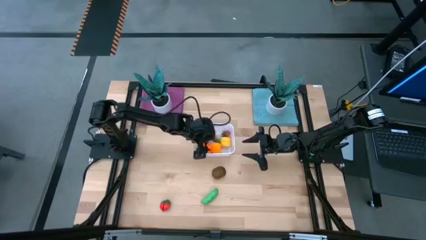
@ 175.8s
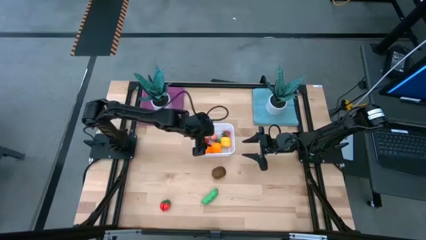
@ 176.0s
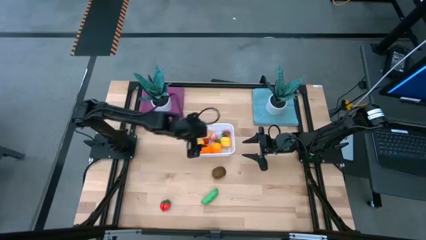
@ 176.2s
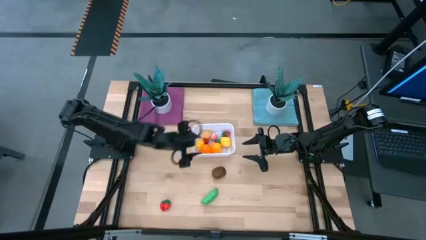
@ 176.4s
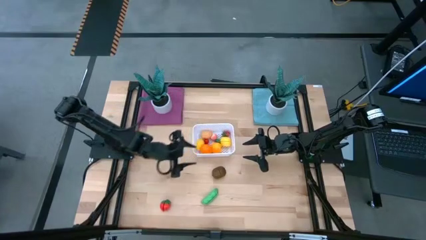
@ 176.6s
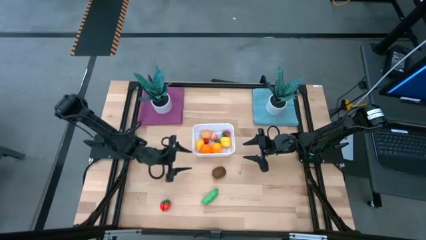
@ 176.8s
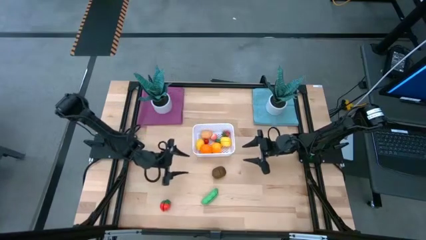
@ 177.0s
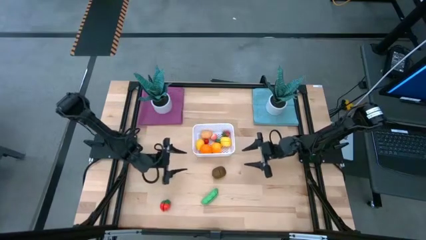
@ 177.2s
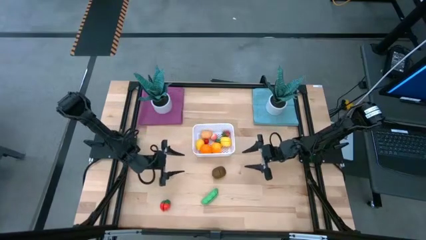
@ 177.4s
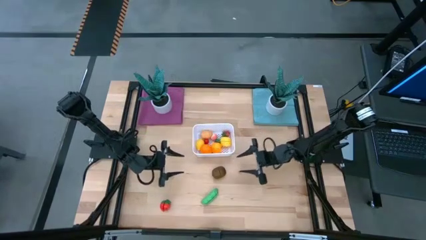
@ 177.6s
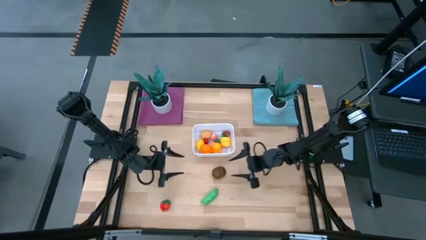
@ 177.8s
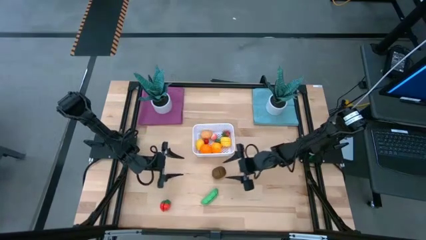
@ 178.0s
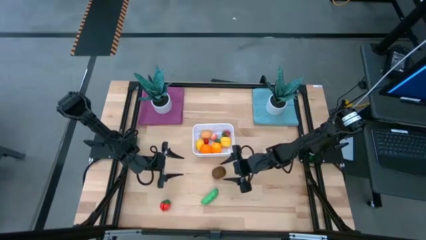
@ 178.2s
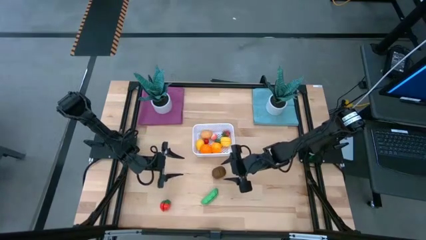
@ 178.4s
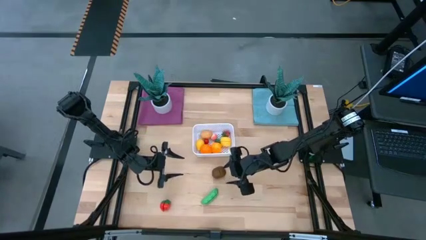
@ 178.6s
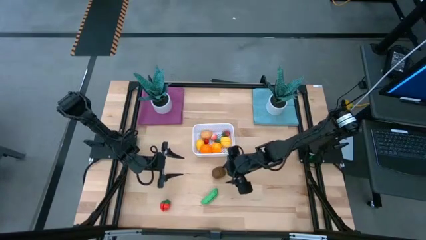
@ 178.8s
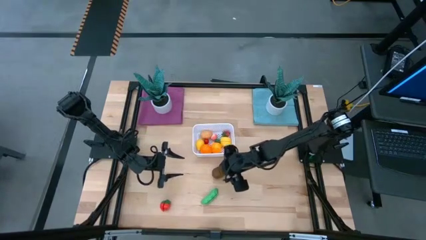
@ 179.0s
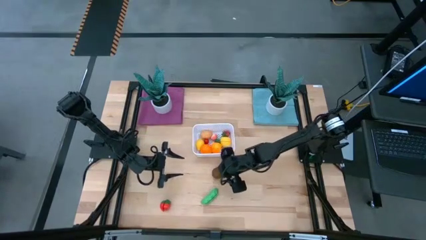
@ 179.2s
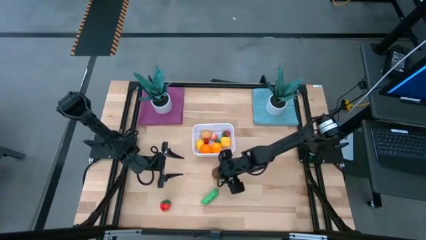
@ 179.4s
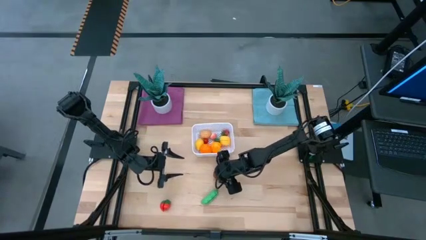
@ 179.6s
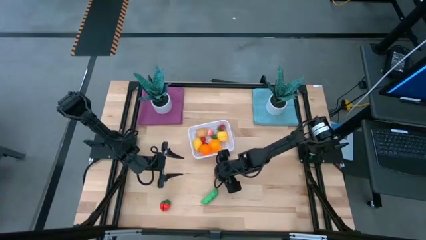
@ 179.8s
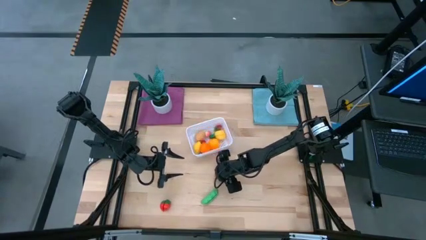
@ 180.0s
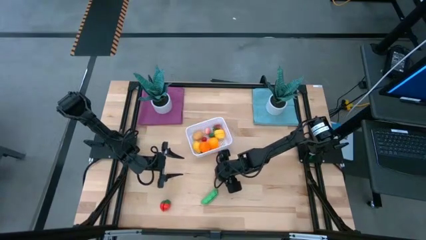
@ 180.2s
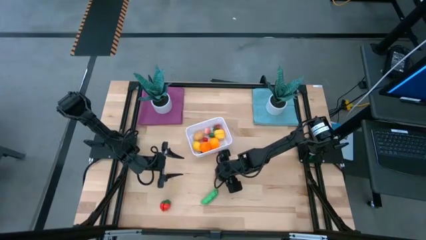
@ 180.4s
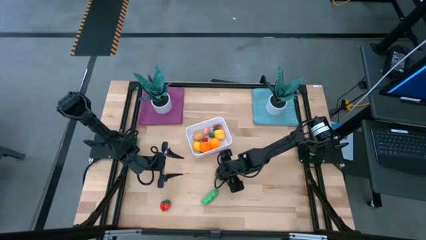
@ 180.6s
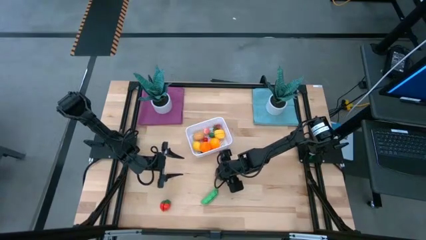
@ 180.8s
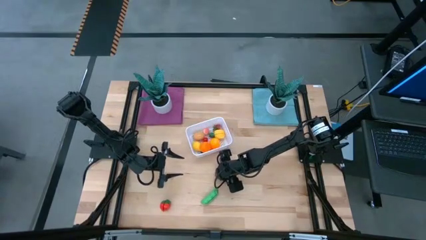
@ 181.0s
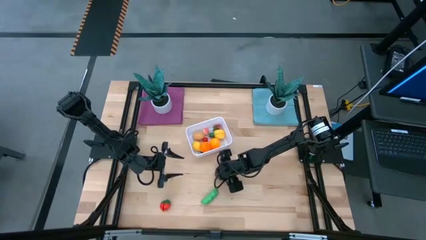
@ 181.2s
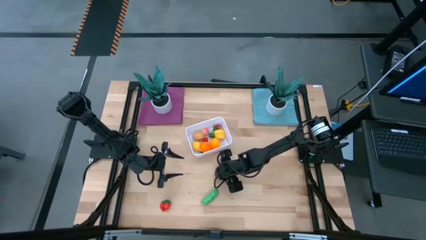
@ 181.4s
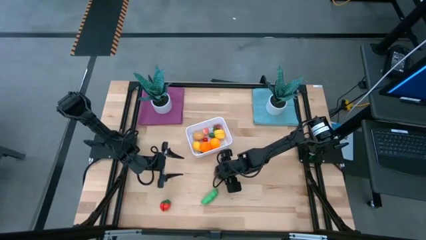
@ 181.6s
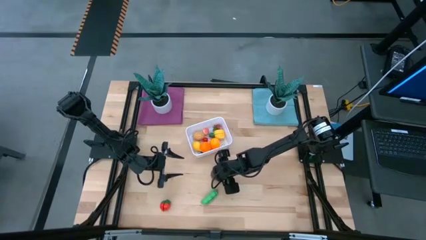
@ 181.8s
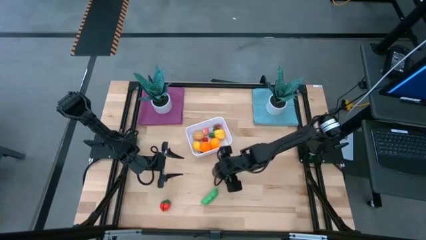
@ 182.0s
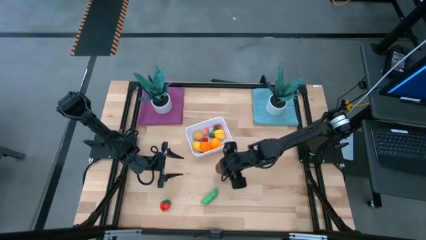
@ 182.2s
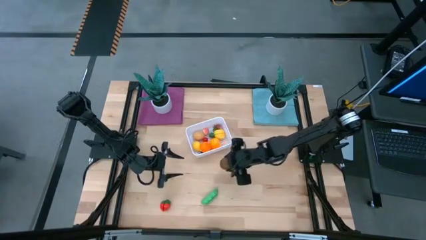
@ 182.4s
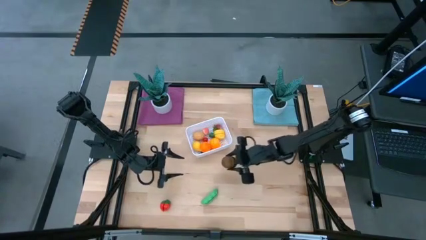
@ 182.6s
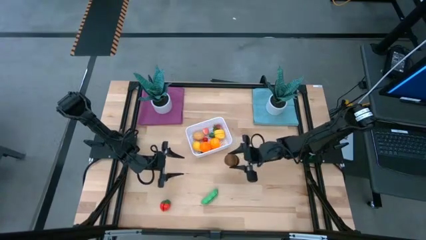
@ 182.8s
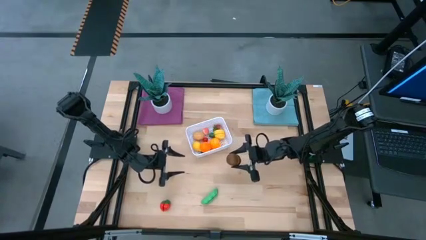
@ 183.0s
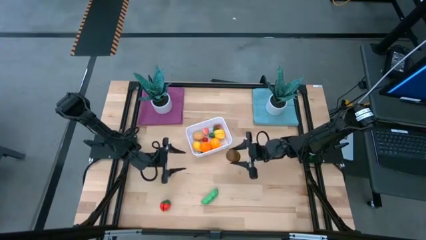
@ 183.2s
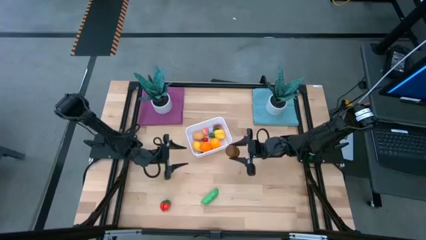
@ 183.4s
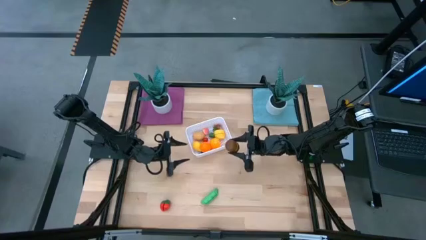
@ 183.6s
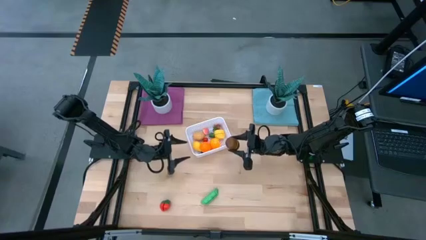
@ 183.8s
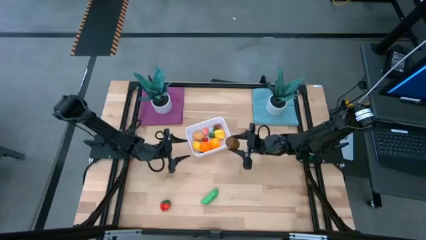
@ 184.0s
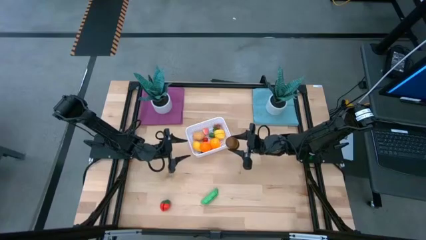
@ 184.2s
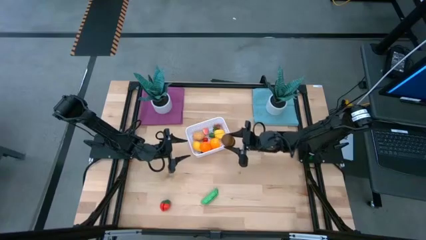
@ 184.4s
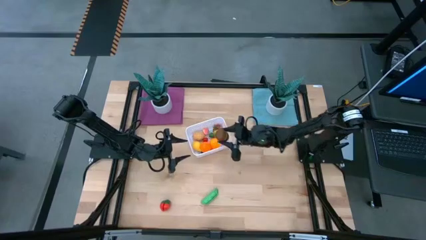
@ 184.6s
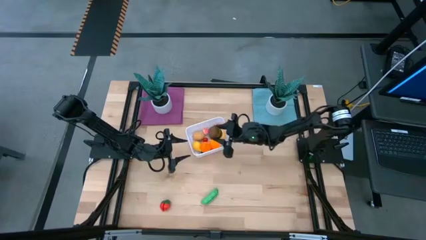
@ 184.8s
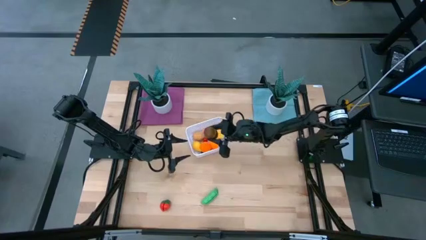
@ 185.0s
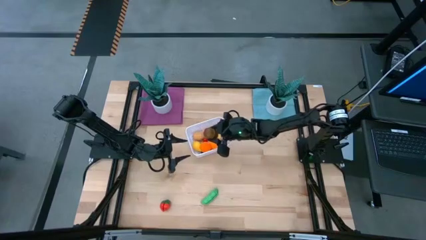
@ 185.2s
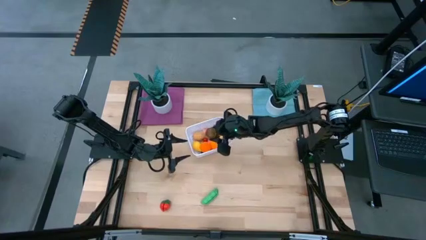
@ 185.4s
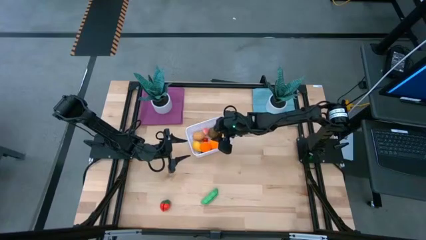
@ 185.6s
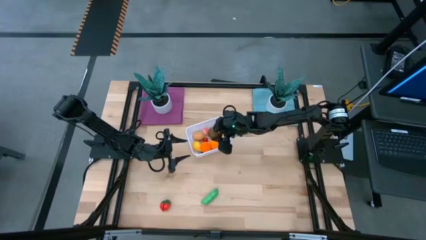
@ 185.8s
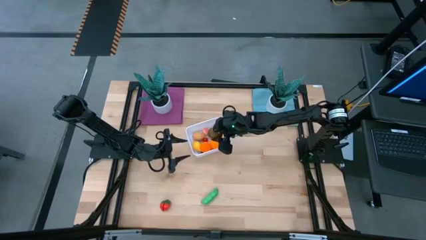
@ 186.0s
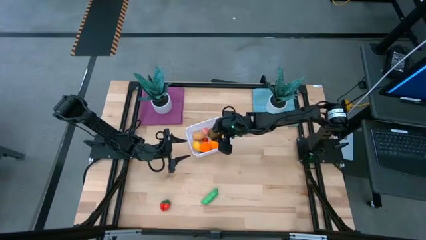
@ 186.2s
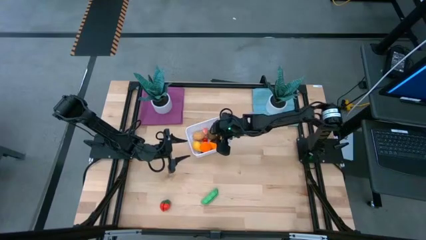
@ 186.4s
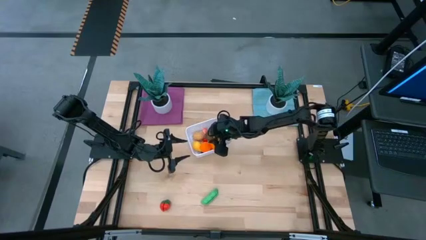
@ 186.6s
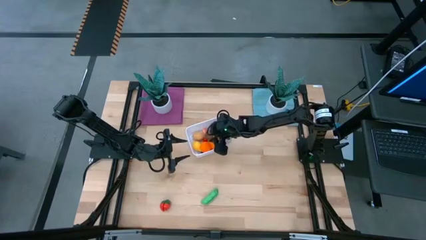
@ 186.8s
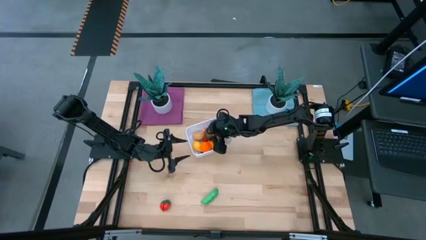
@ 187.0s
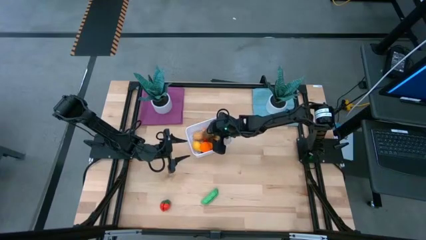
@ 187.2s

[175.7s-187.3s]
Task: Pick and placing Produce into tupperware
Put the brown kiwi into the white bin
